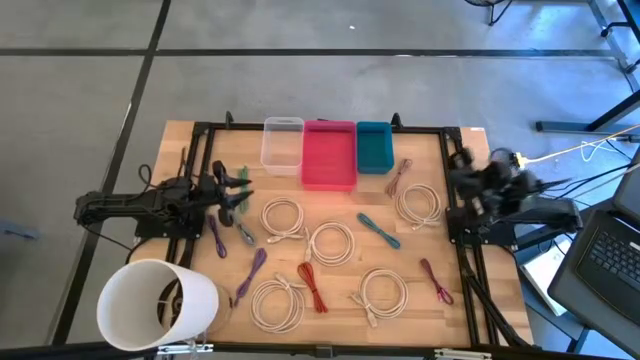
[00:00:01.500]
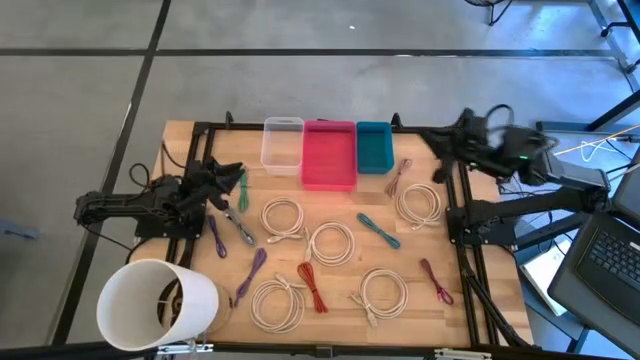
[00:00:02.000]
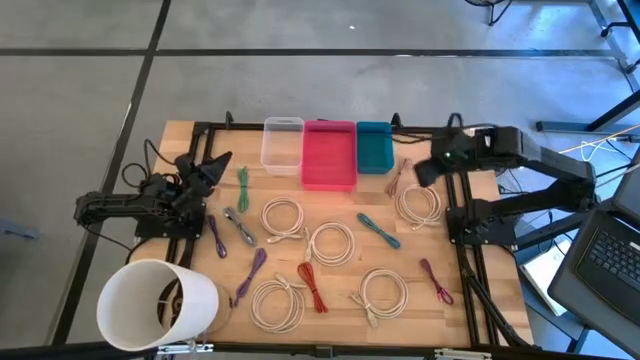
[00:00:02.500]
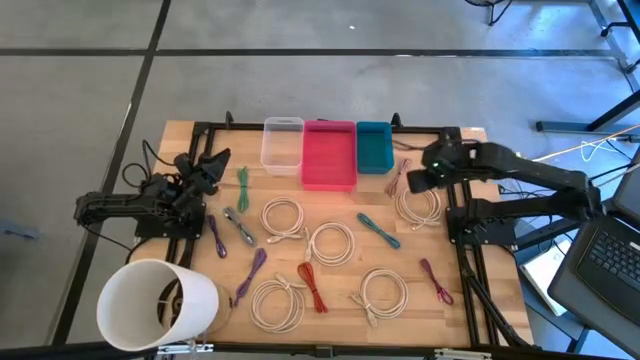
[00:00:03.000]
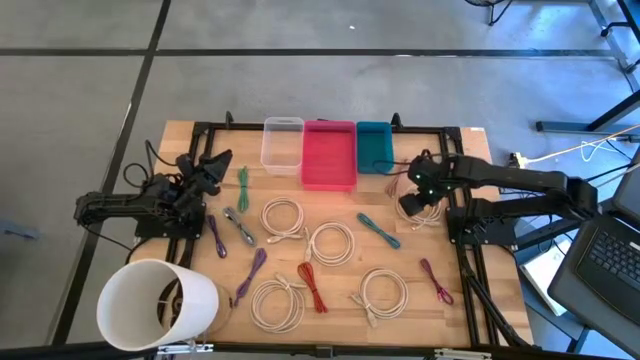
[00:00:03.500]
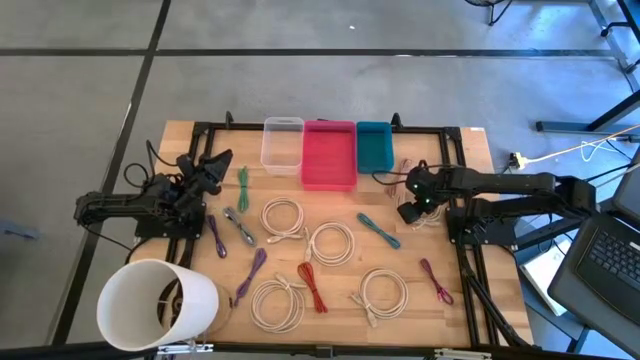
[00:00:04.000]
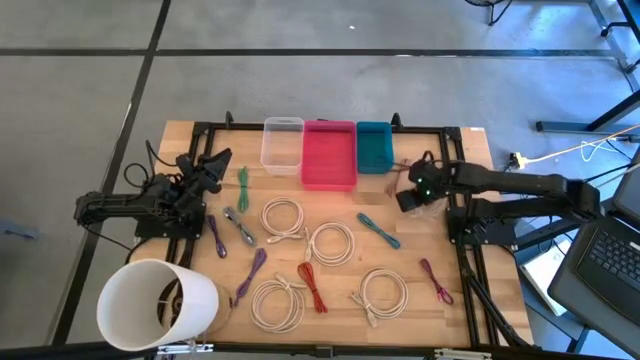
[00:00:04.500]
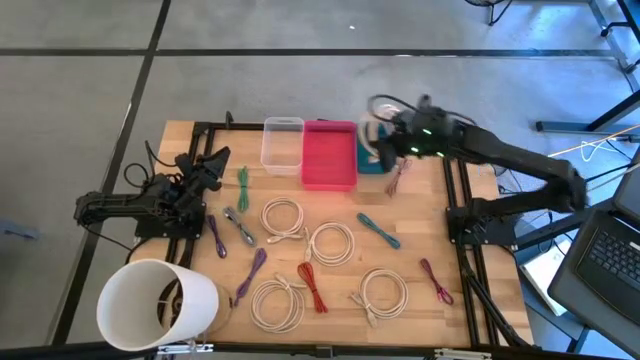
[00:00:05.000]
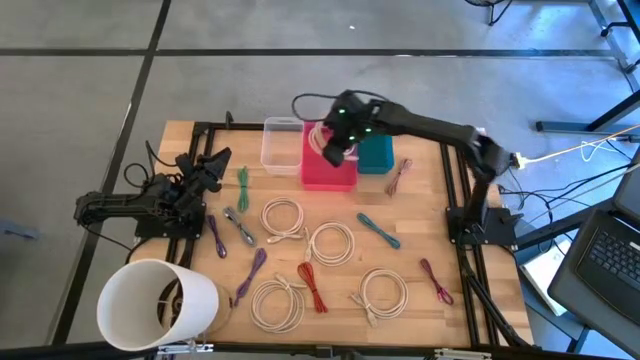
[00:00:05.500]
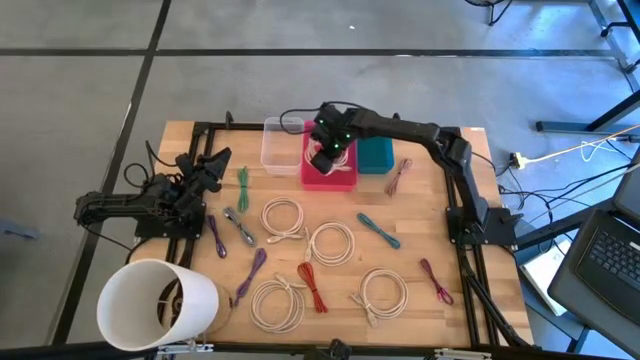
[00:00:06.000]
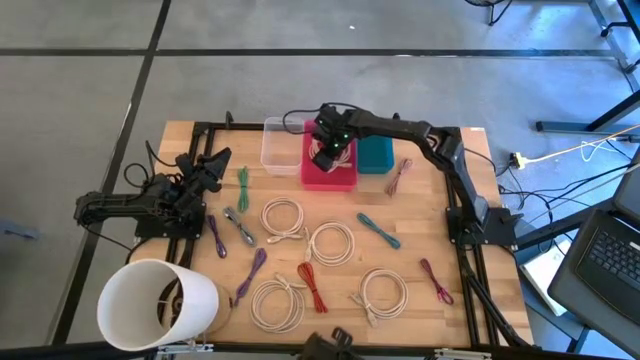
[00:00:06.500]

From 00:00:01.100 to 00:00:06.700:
Task: Pick & Place USB Port
Put the white USB cable into the red bin

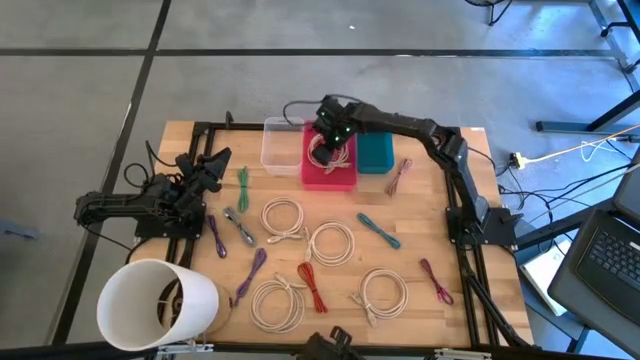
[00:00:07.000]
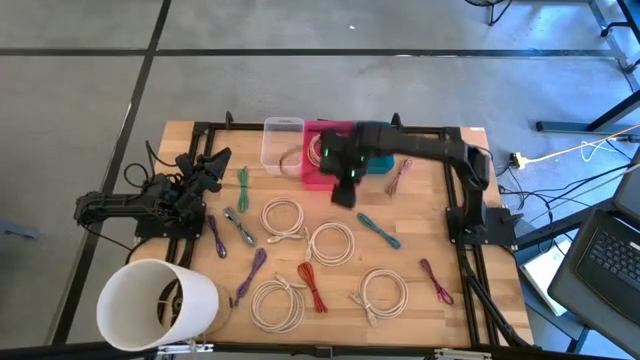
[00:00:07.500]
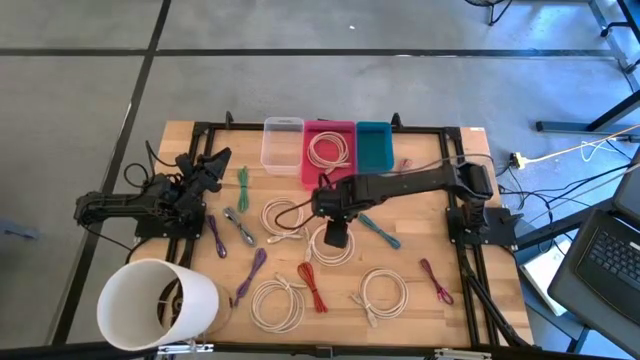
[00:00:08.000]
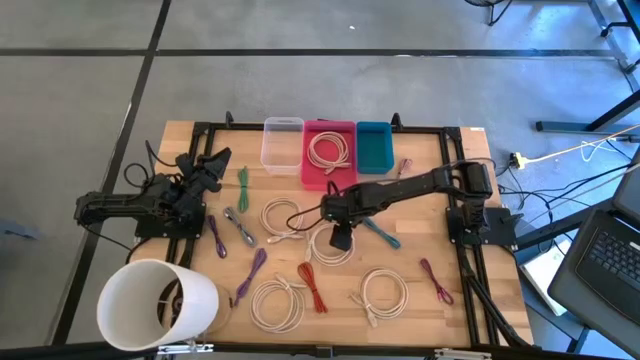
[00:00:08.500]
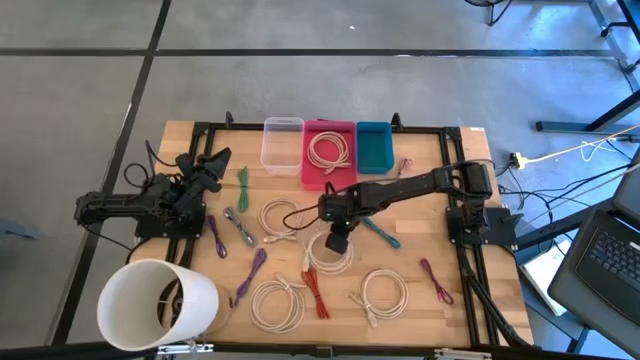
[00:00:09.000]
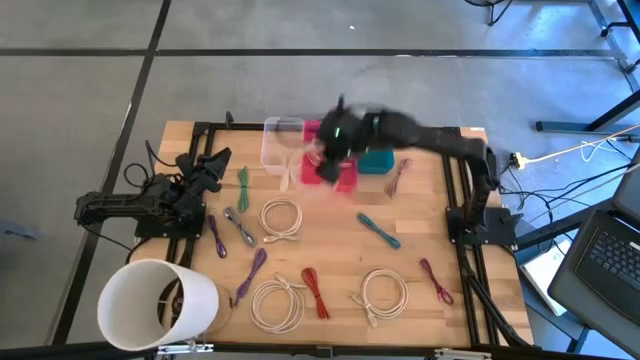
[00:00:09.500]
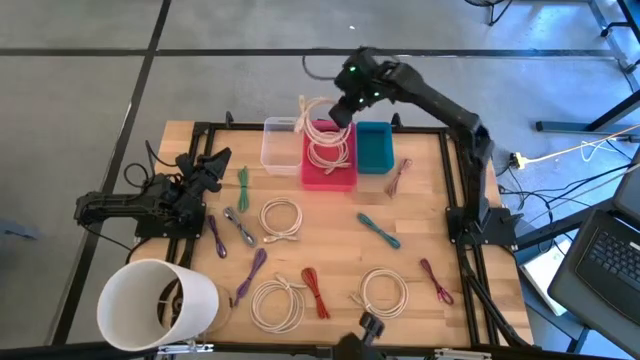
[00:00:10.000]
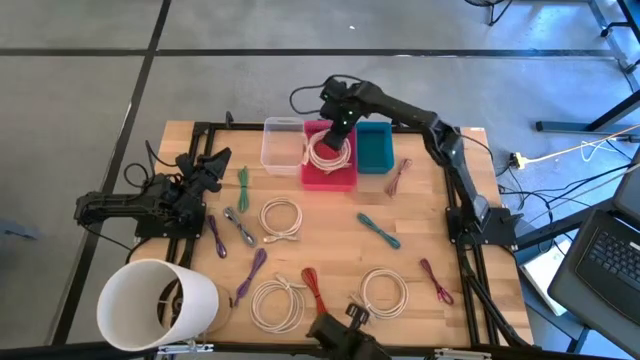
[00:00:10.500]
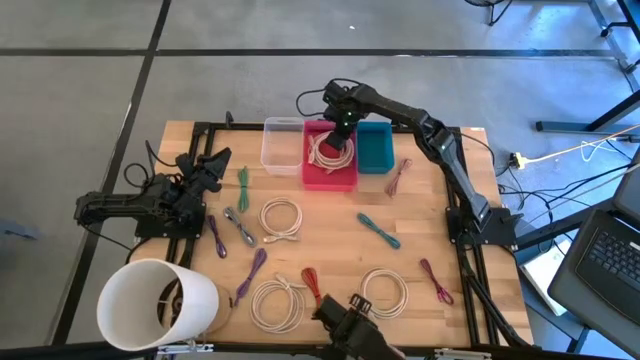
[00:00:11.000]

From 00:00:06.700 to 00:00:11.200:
Put the white USB cable into the red bin

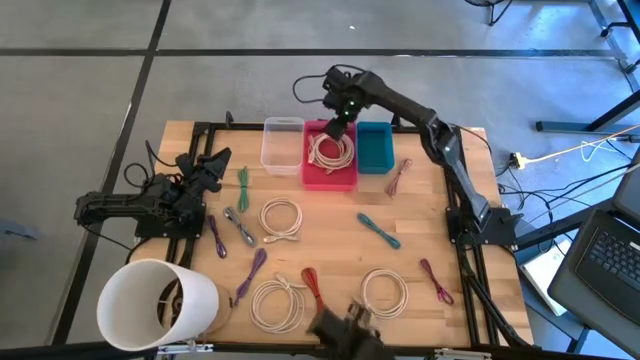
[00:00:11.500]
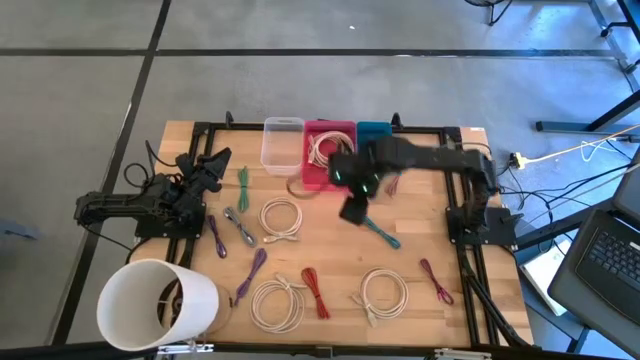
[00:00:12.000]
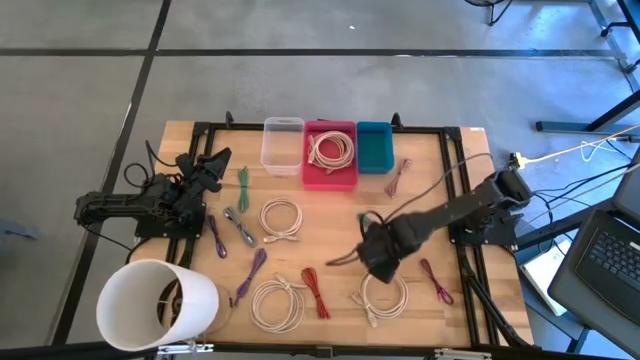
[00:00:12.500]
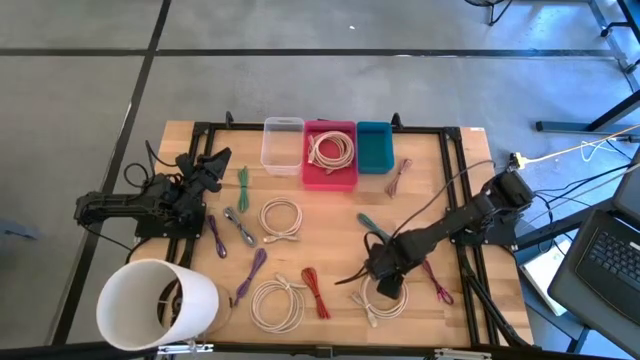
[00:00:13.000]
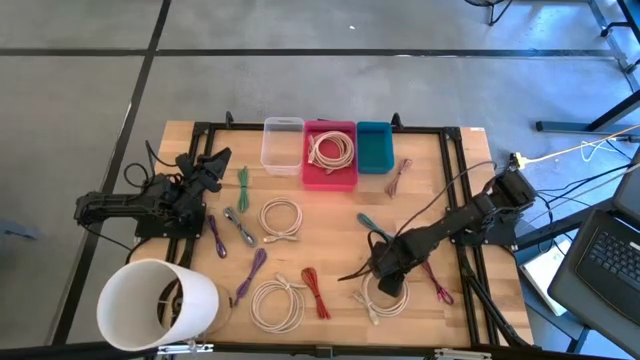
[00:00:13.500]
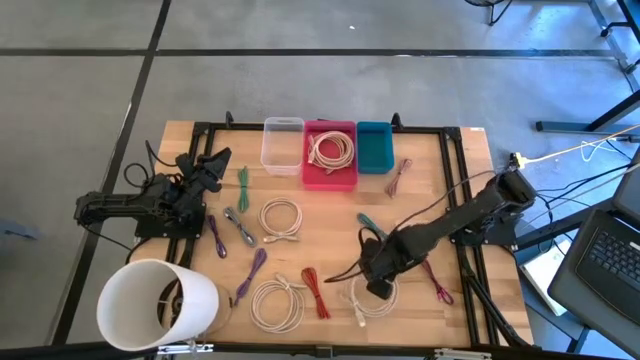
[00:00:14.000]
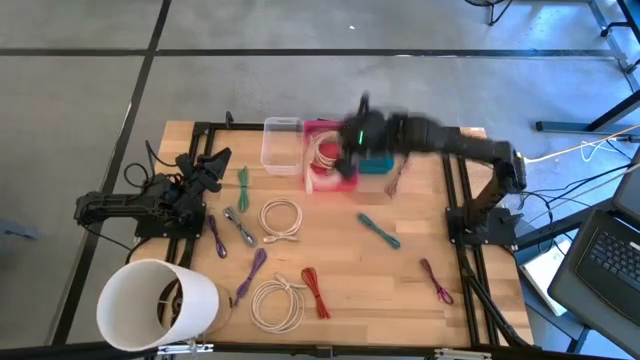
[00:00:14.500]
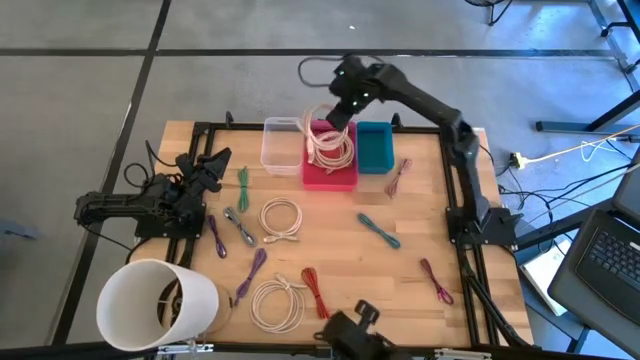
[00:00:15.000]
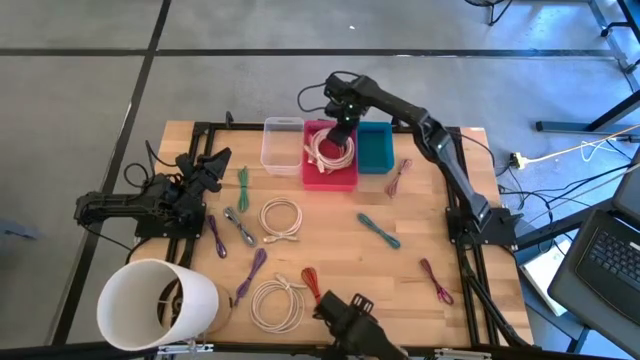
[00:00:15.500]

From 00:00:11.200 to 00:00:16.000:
Put the white USB cable into the red bin

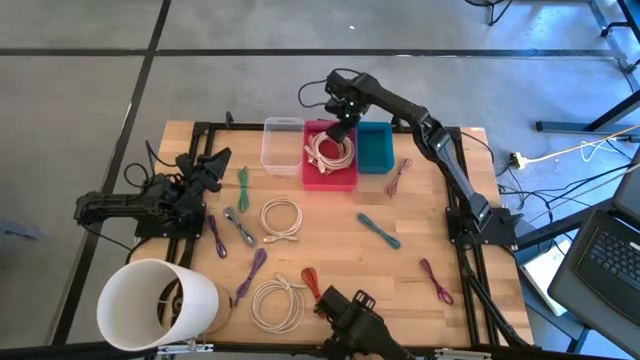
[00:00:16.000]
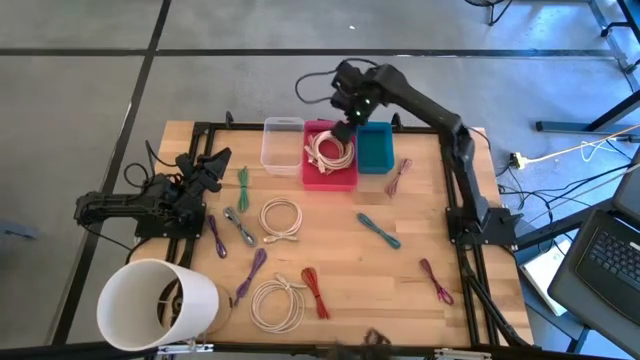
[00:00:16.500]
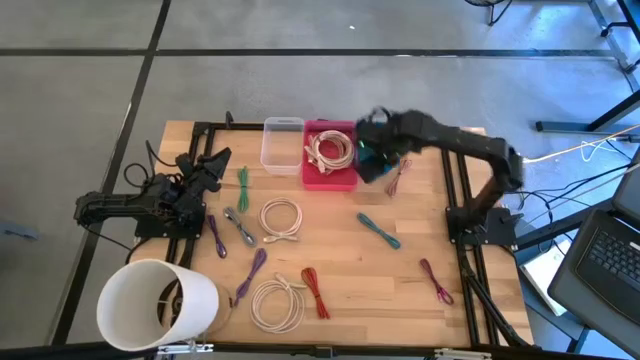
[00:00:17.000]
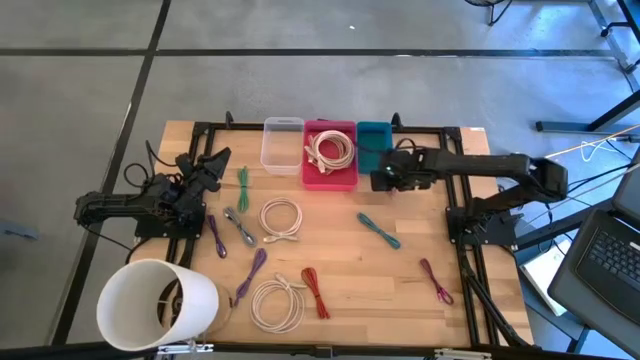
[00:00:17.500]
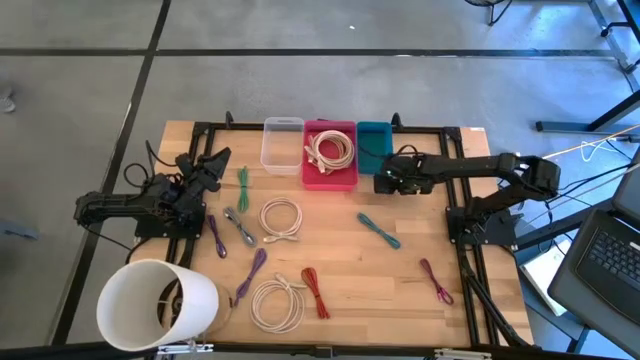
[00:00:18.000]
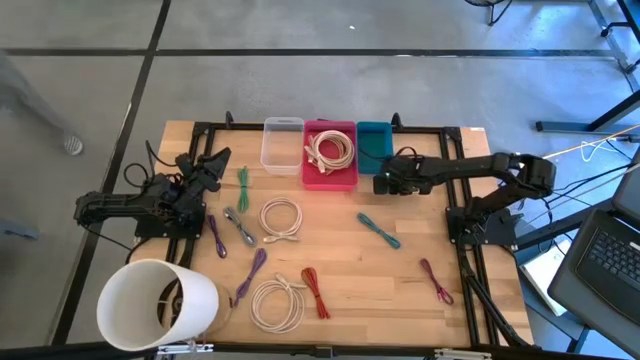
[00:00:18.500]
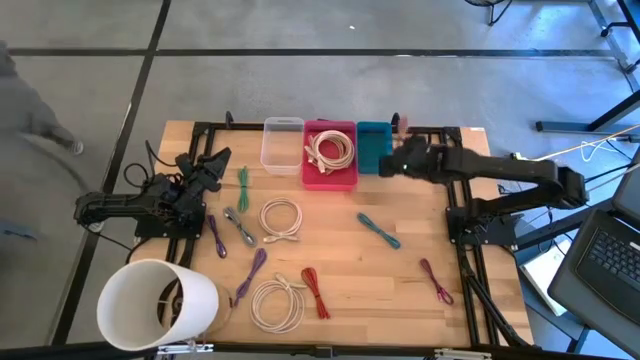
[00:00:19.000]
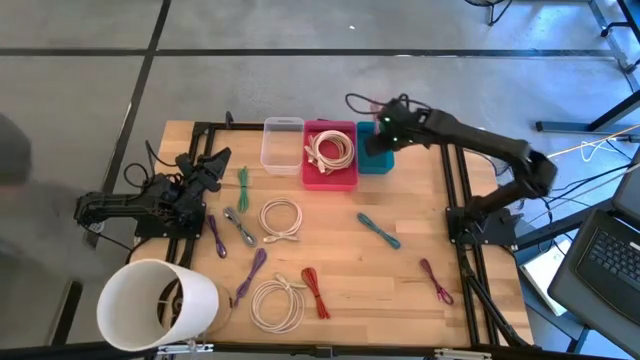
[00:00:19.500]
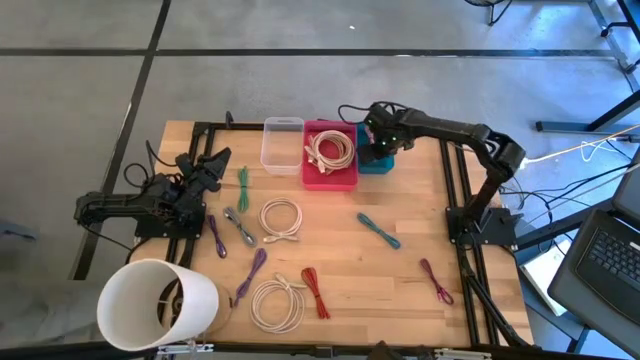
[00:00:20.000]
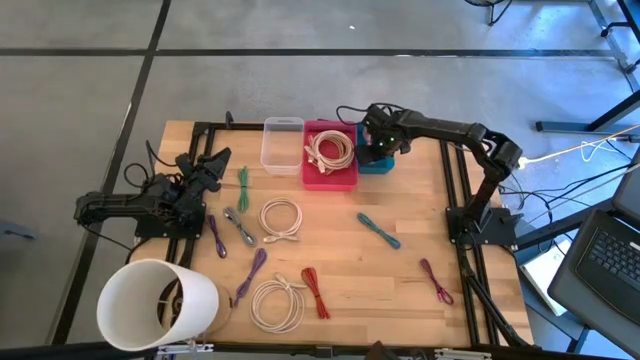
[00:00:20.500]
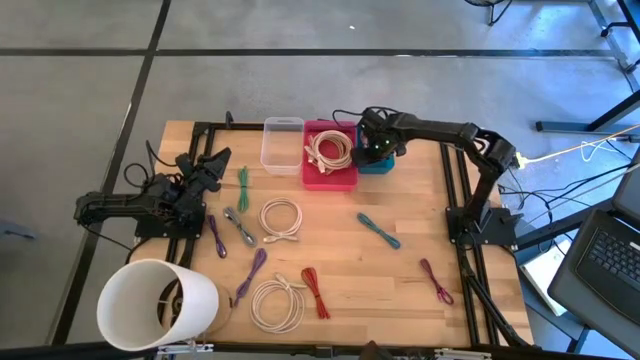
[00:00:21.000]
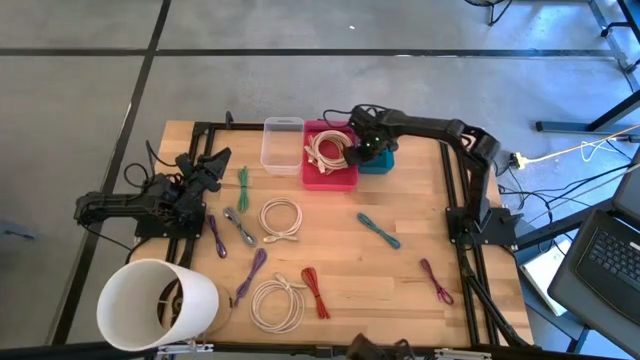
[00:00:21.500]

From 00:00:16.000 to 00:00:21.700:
Put the pink USB cable into the blue bin
